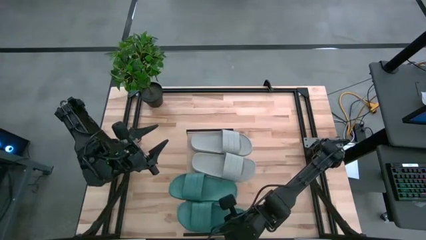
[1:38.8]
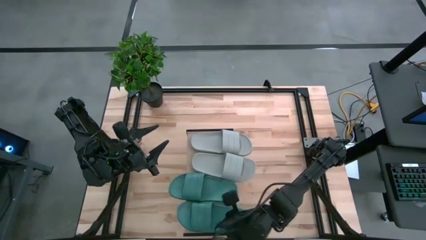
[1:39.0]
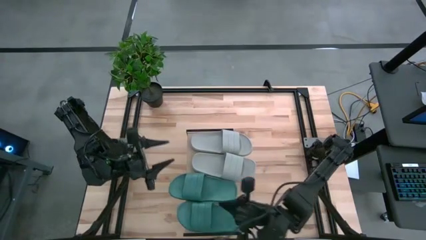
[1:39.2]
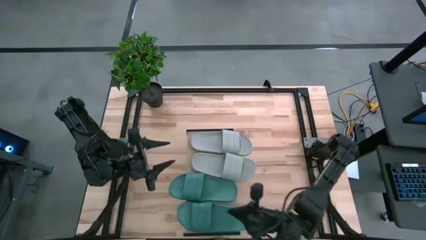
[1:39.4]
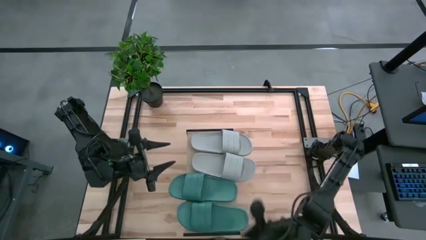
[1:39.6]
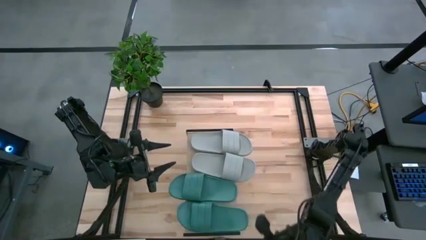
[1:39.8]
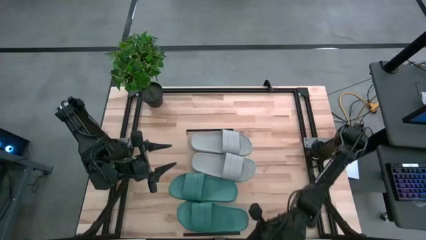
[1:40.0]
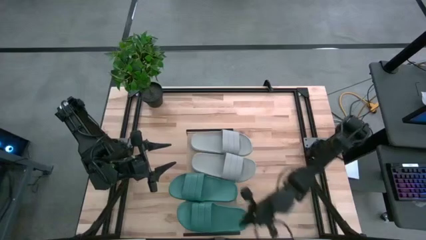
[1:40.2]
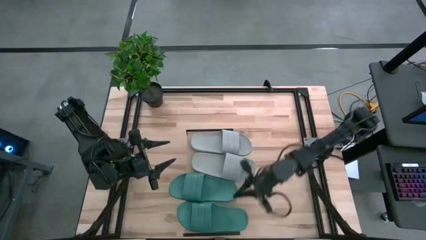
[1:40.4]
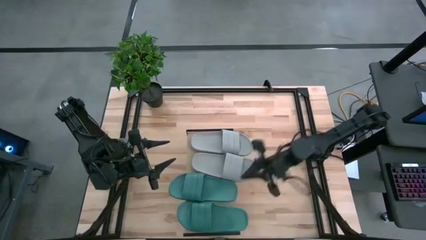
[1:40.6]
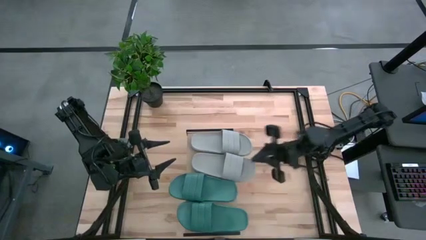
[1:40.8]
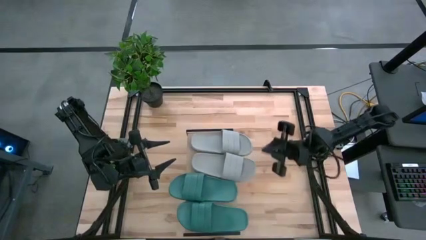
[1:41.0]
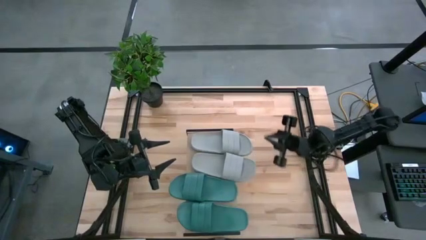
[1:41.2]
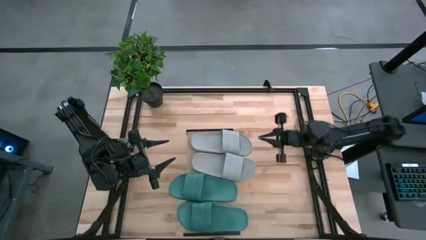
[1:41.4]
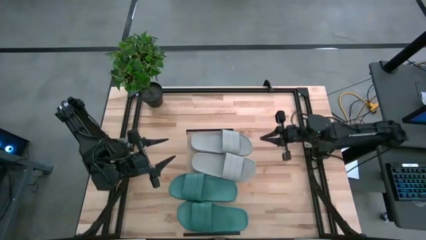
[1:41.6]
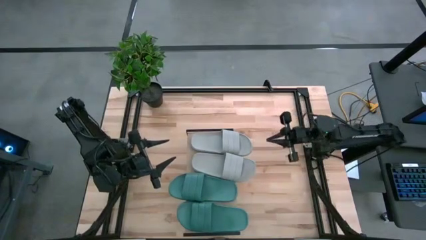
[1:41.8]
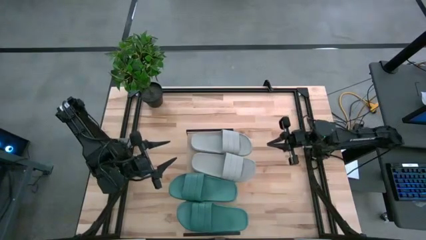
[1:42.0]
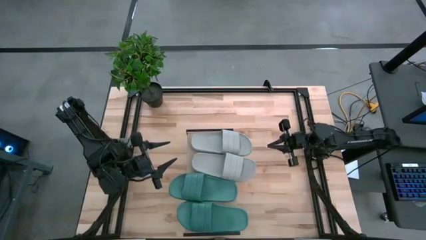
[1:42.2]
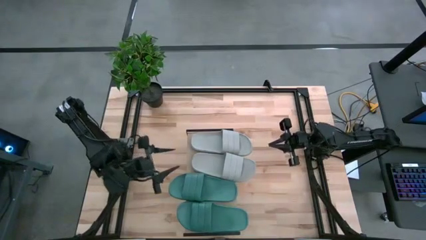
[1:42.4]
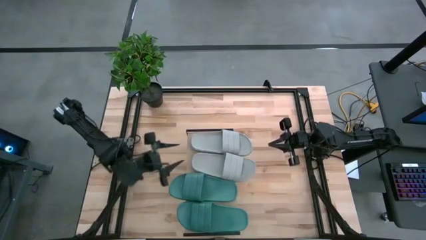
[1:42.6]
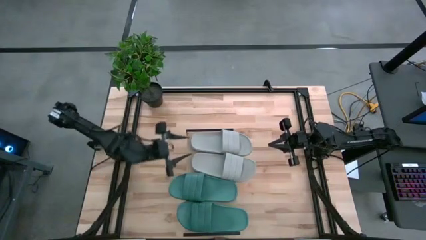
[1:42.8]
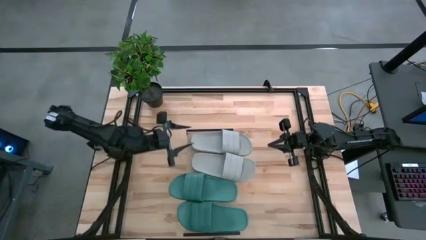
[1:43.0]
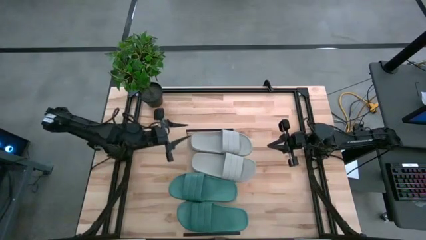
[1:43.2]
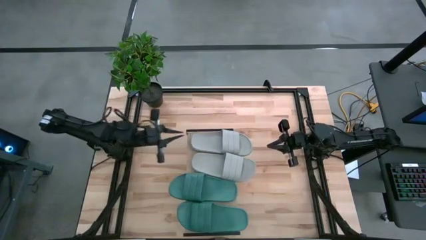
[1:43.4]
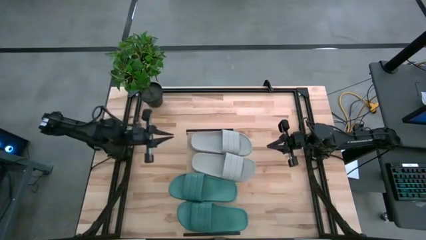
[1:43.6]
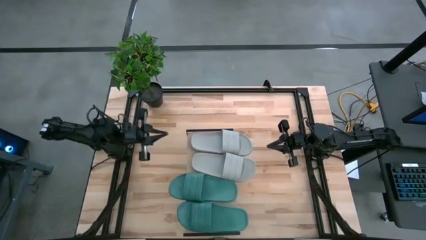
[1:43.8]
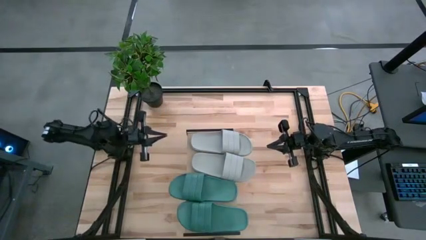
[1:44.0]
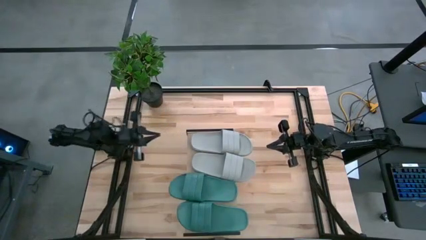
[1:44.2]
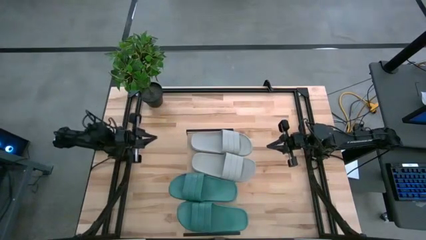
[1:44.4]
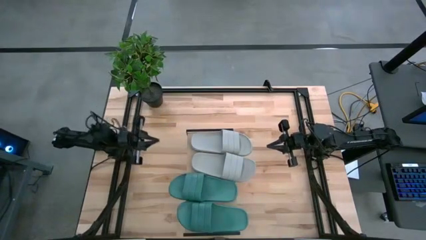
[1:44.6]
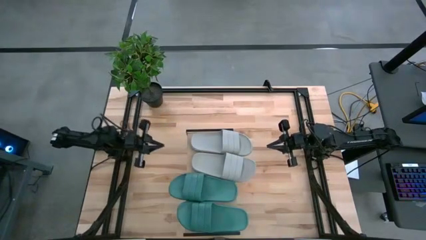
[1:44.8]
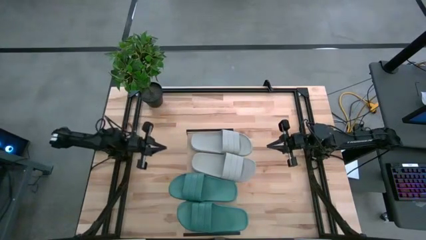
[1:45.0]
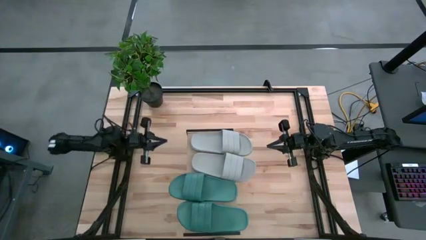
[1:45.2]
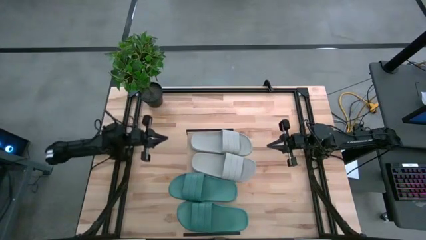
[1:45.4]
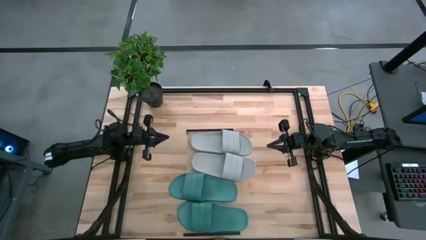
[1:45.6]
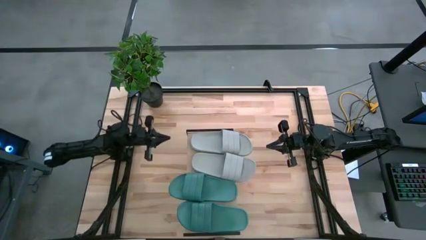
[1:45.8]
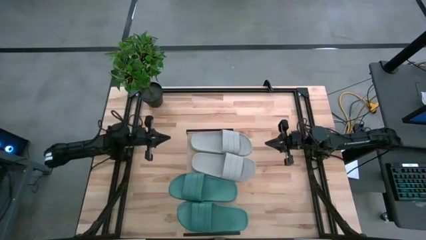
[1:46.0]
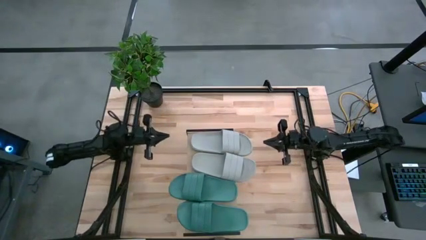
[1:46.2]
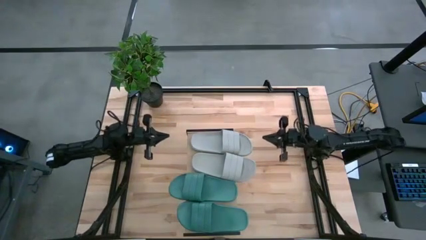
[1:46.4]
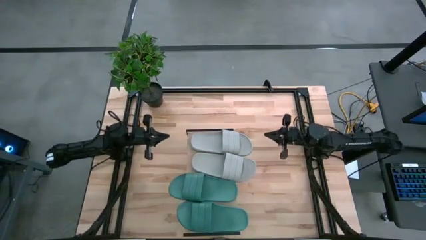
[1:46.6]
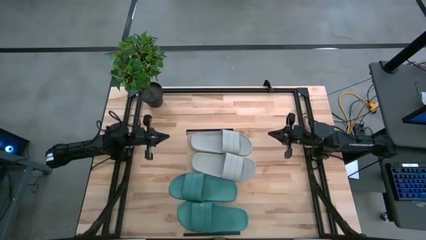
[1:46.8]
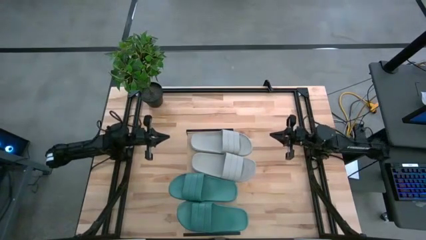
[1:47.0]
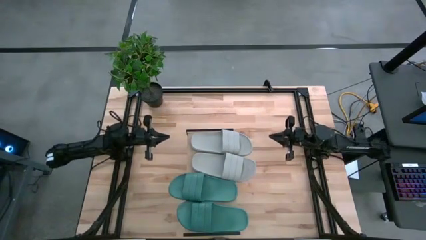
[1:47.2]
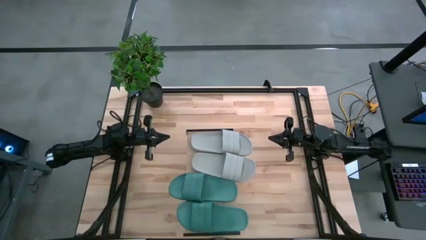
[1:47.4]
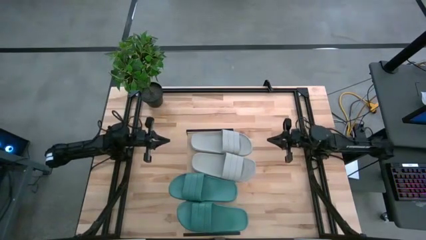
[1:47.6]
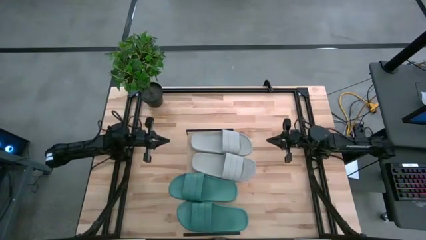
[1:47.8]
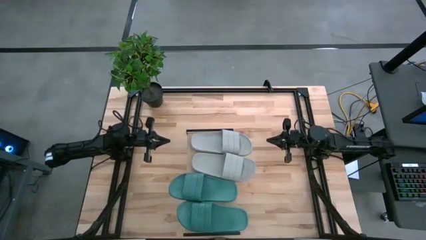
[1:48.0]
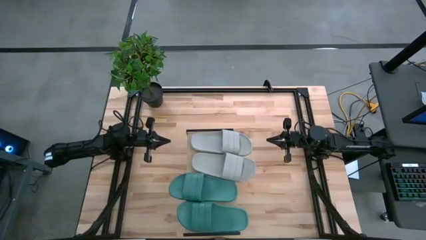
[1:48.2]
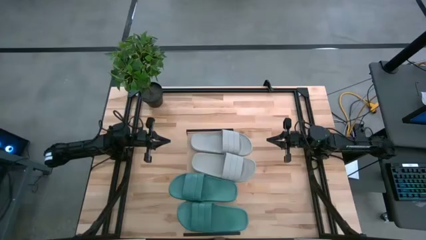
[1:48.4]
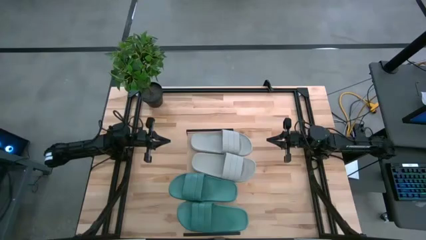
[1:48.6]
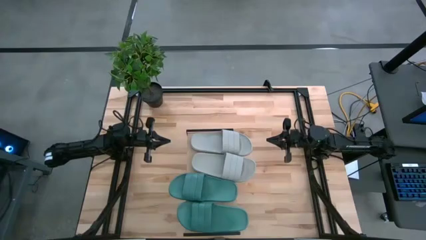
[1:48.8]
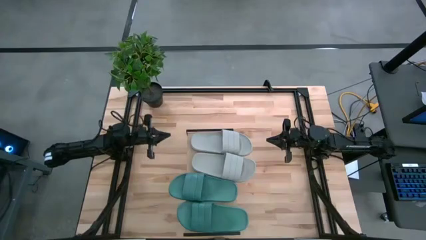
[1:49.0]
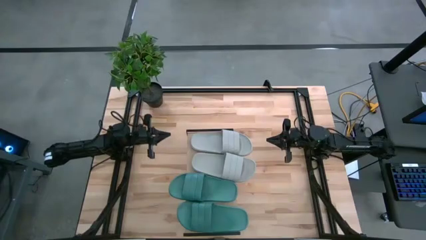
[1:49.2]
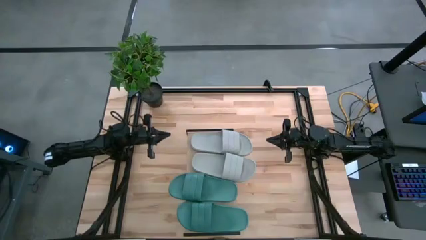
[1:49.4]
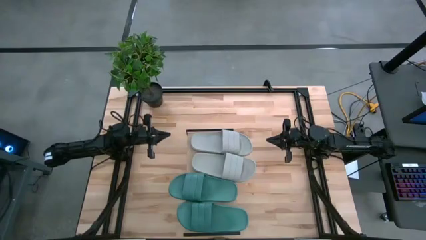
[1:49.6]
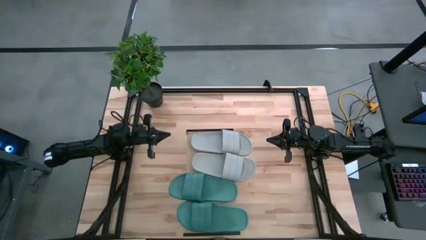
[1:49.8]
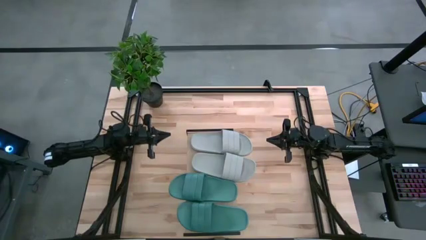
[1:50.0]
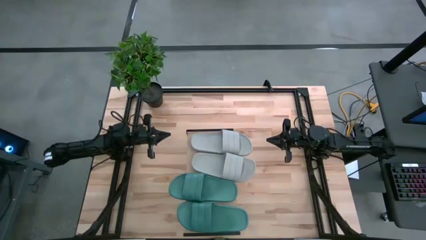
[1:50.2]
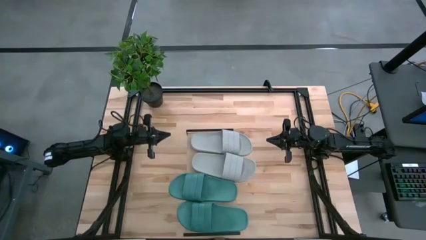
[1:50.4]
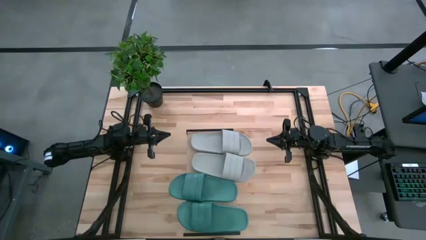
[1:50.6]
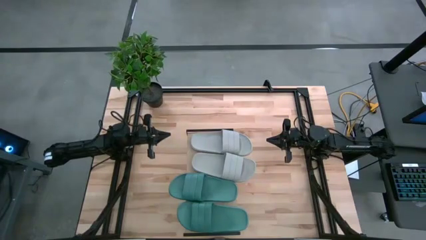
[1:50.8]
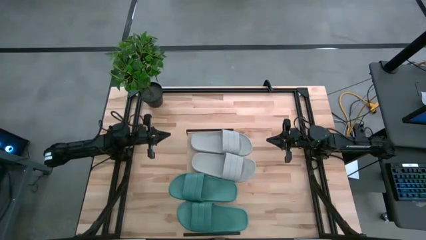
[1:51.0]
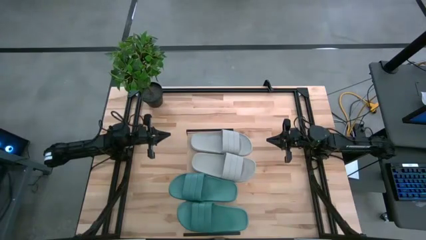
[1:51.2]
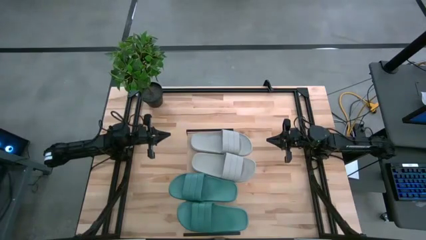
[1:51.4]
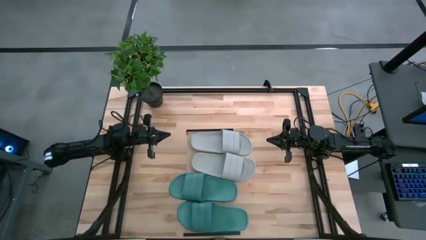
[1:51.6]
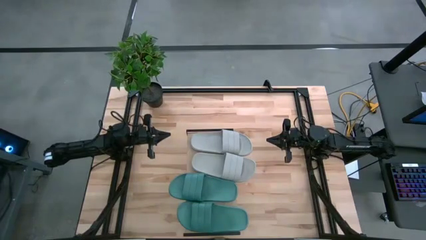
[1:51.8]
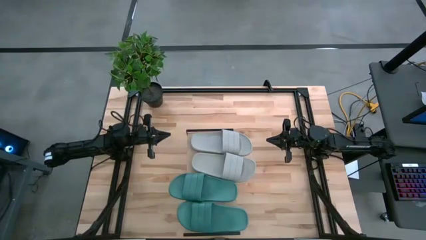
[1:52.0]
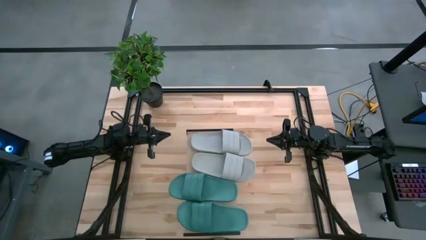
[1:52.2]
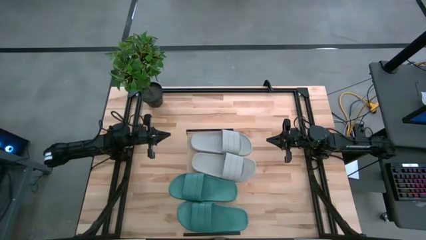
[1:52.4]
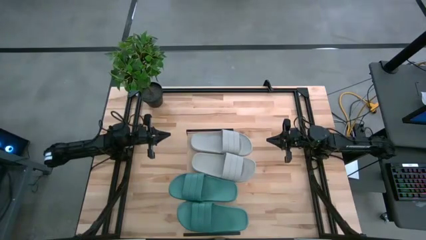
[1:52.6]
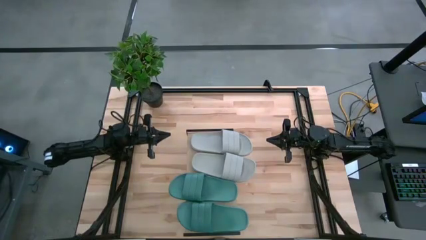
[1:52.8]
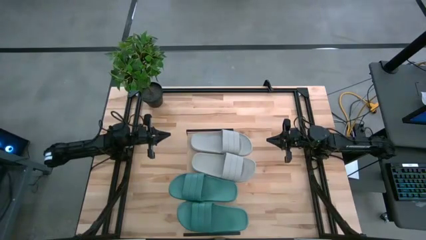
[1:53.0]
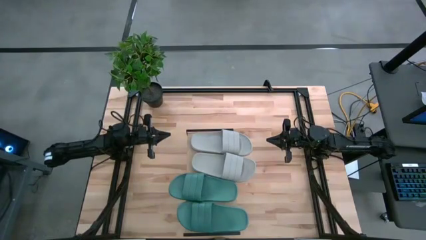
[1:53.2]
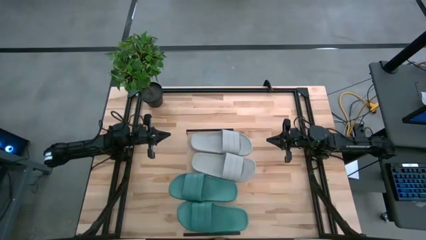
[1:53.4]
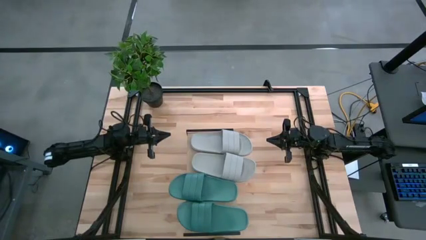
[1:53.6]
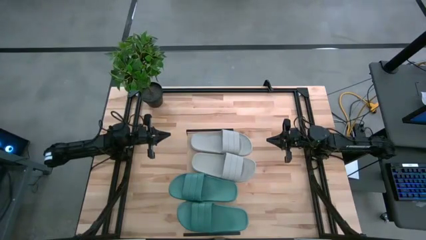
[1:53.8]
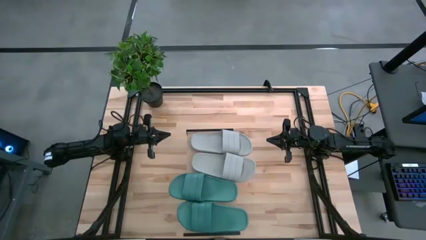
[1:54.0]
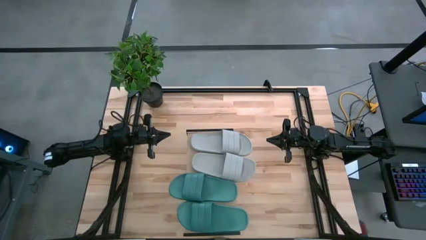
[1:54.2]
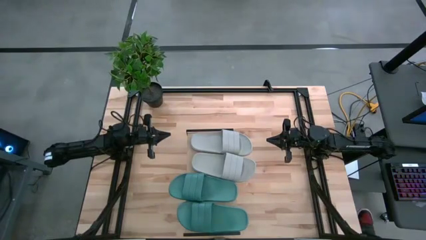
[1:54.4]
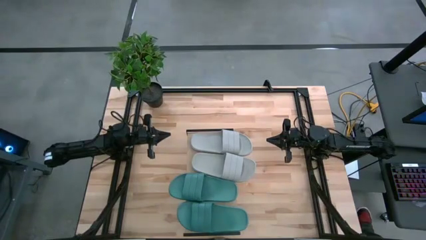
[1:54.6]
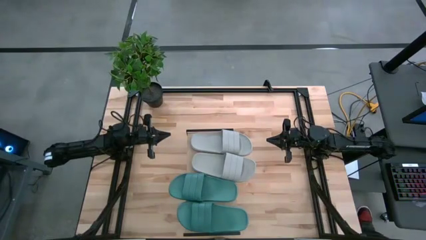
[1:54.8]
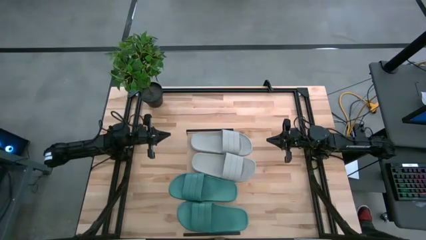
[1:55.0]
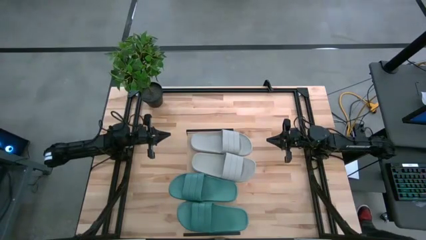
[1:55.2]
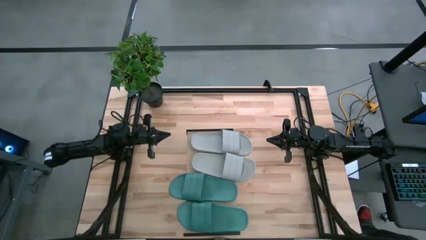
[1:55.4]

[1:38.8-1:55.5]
Task: Pick and place slides into the shelf
Return to Home Position
